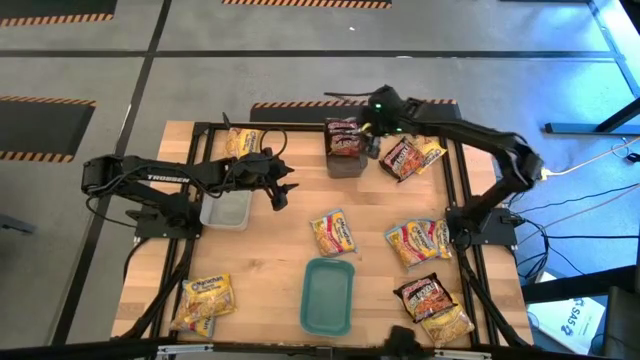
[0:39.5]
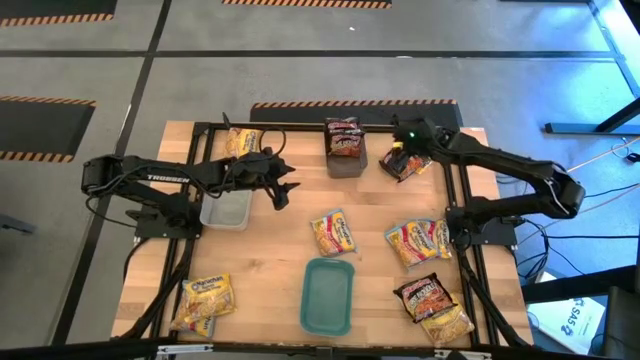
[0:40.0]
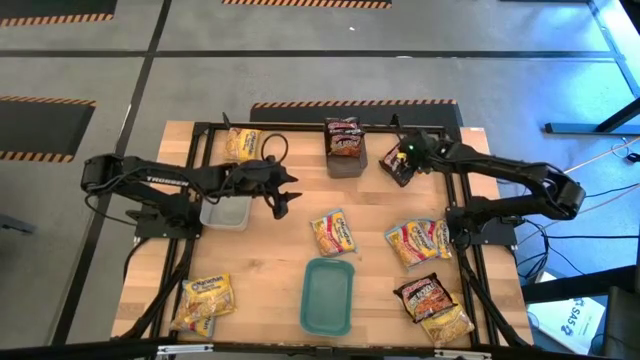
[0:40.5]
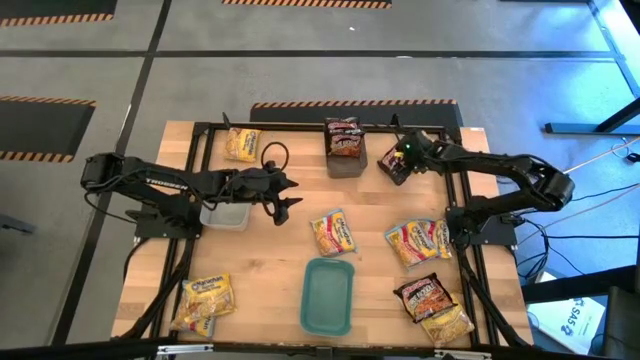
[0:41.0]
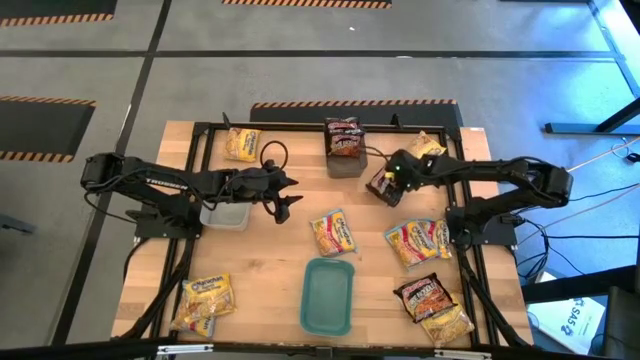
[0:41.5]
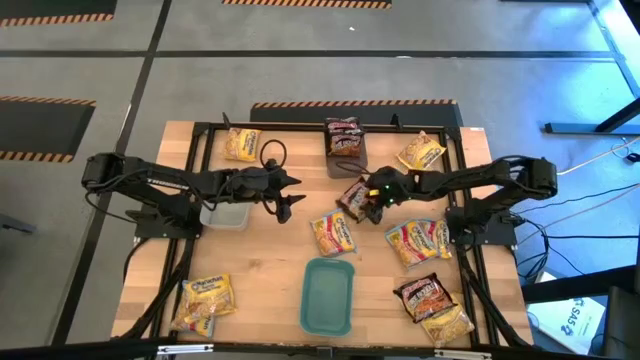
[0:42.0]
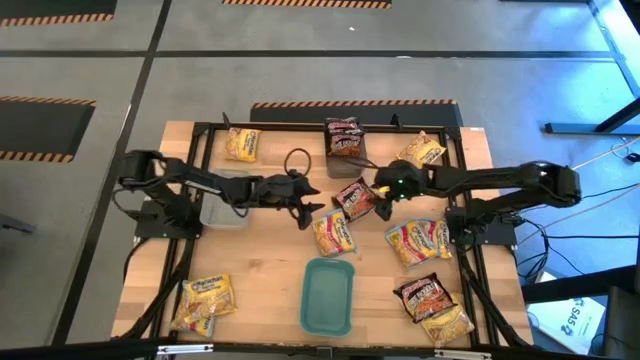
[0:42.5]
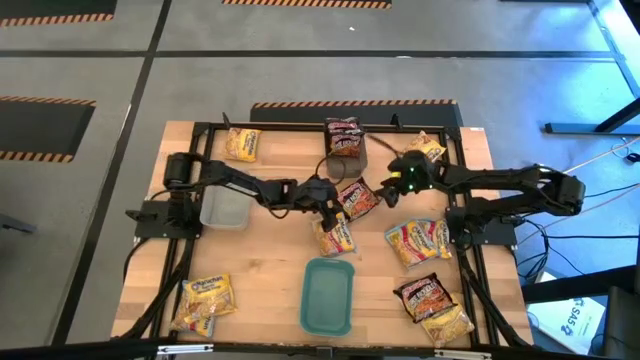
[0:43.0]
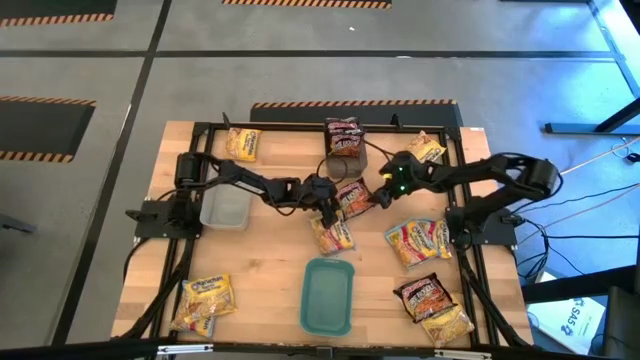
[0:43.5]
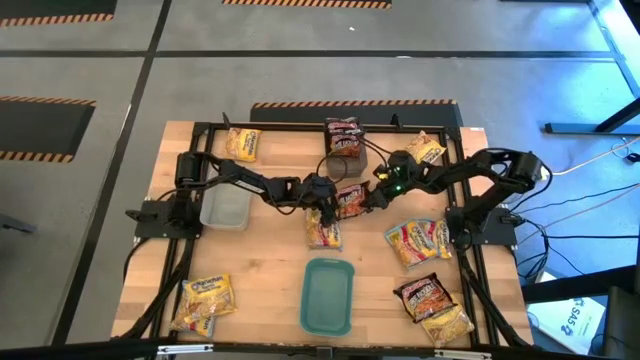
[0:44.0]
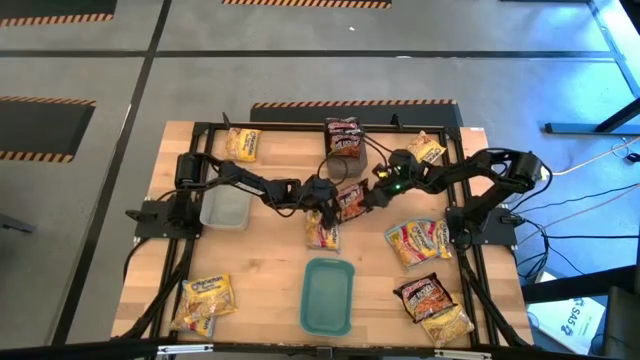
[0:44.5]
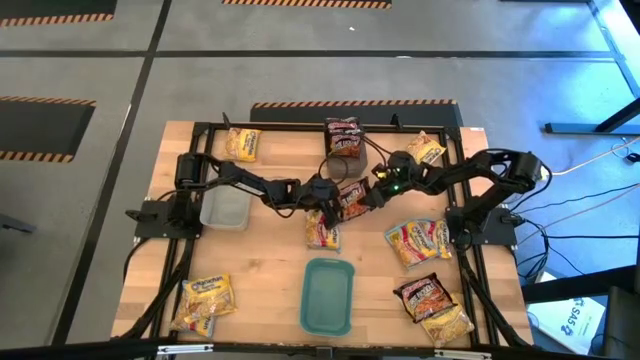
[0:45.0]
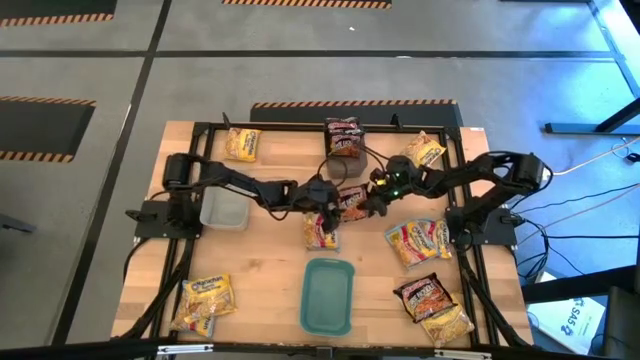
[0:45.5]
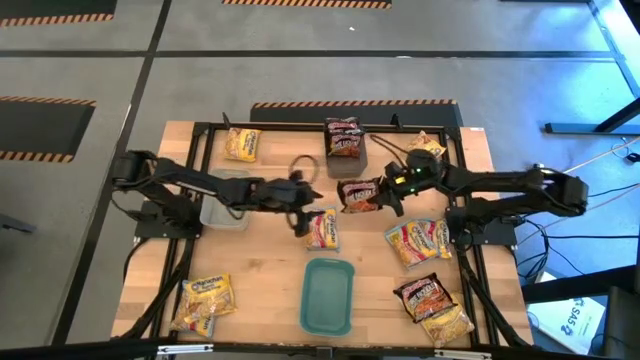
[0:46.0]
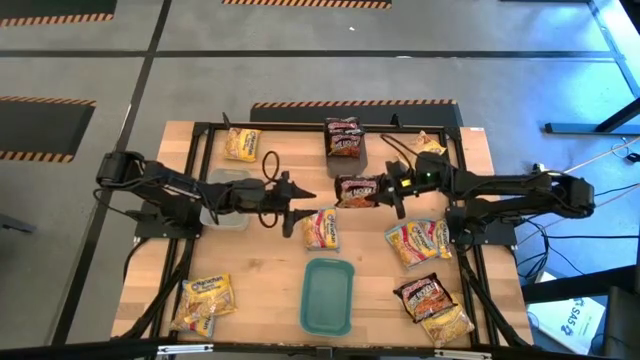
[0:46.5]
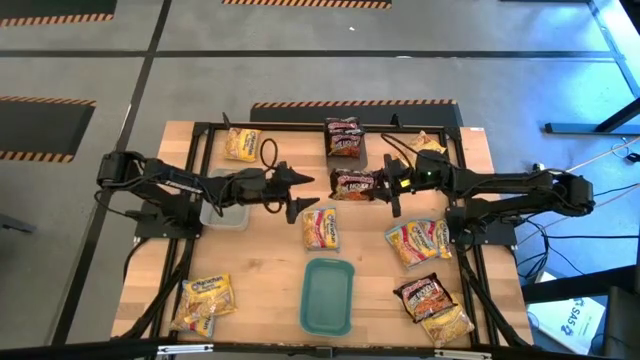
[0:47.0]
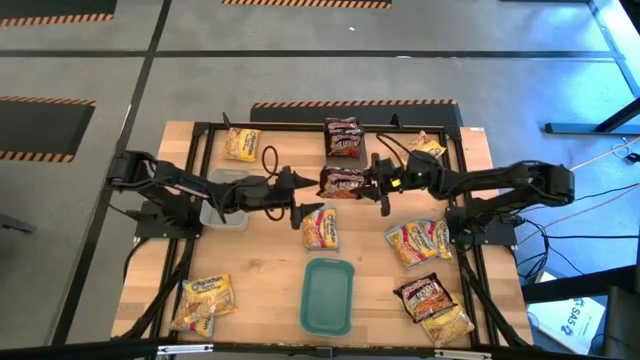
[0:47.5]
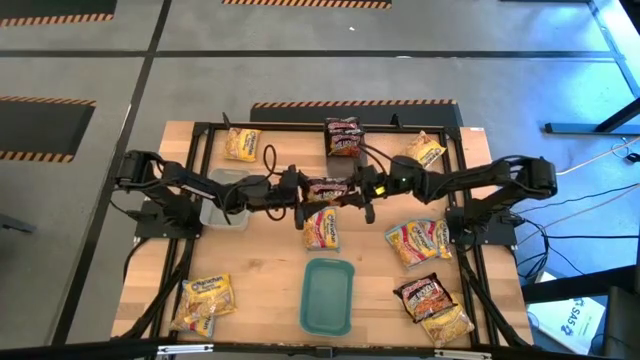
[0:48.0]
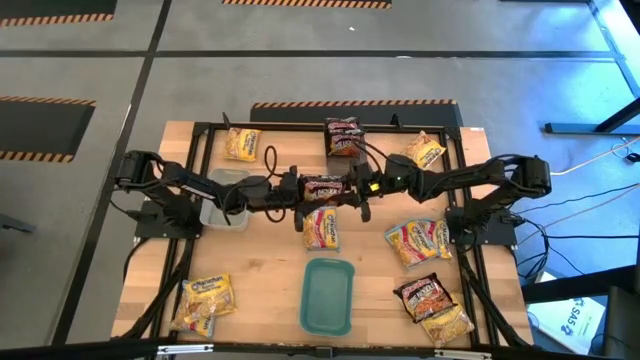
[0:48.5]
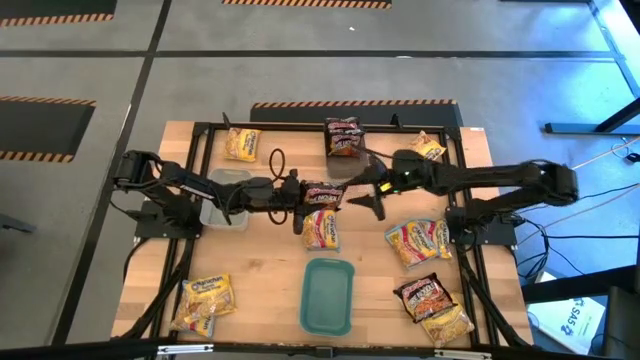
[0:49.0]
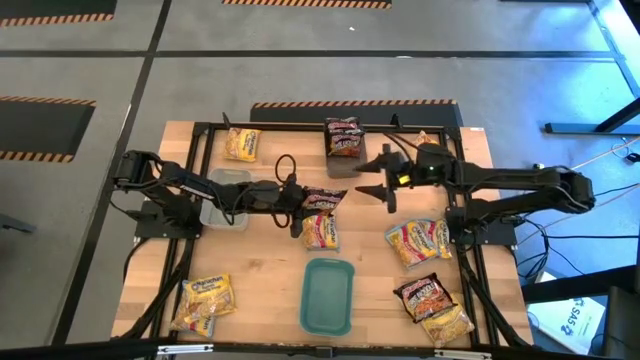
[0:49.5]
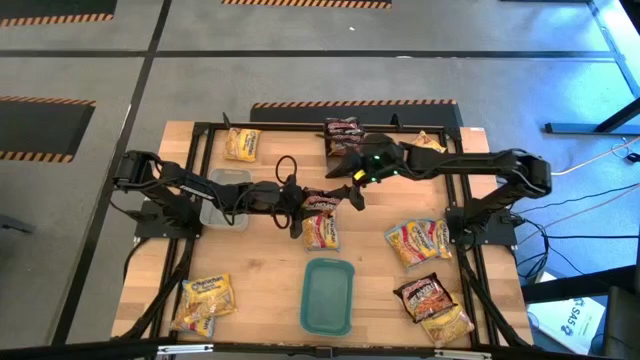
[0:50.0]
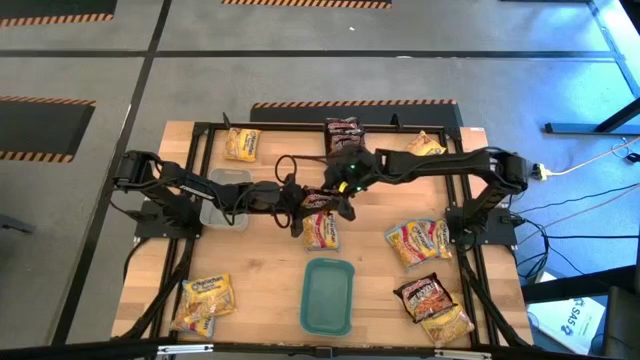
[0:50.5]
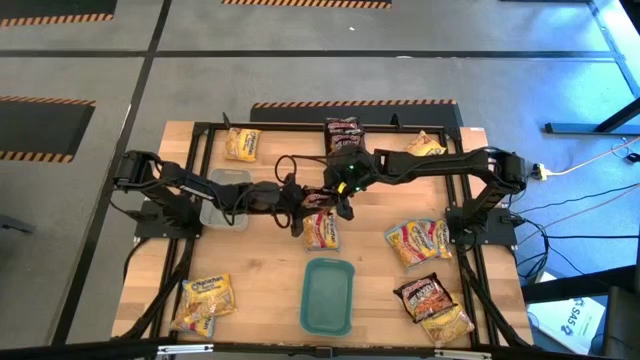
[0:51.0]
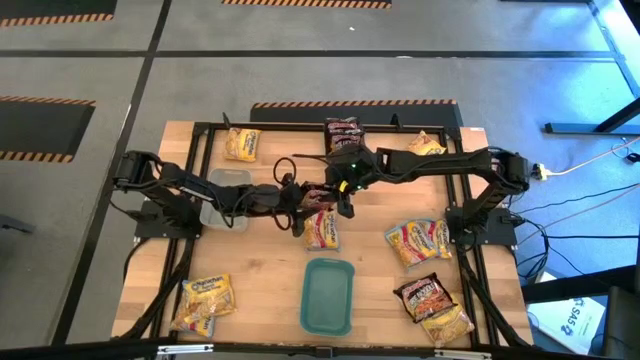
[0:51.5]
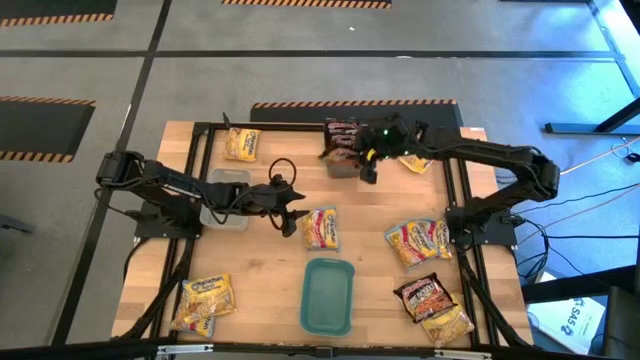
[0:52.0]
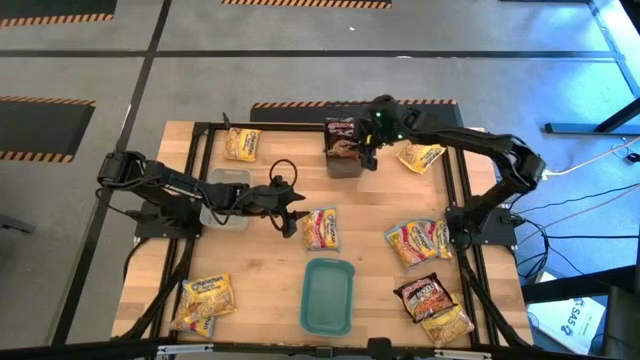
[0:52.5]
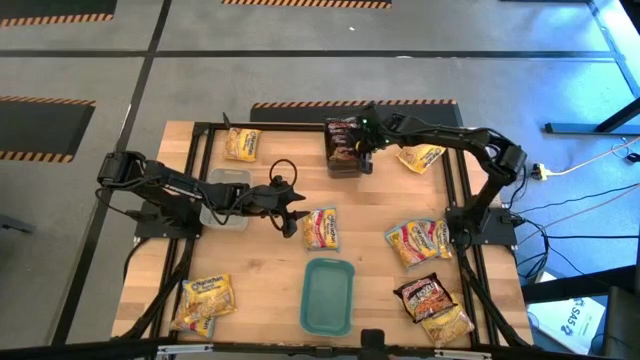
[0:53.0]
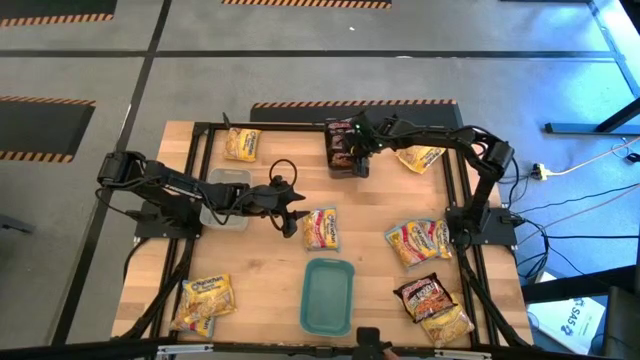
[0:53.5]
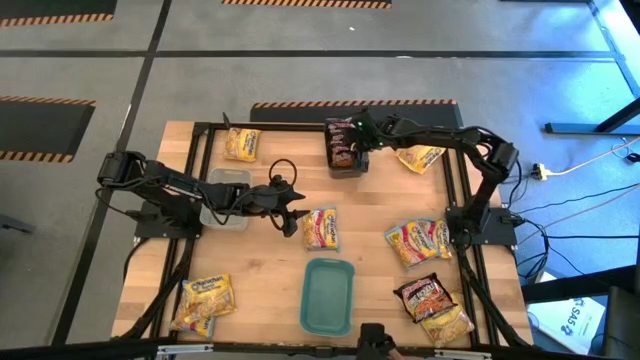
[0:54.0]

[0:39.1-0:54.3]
Task: Sort Maruchan noodles
Put the black noodle pack into the black bin
